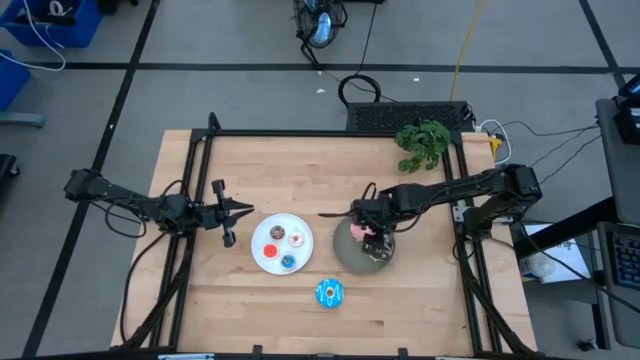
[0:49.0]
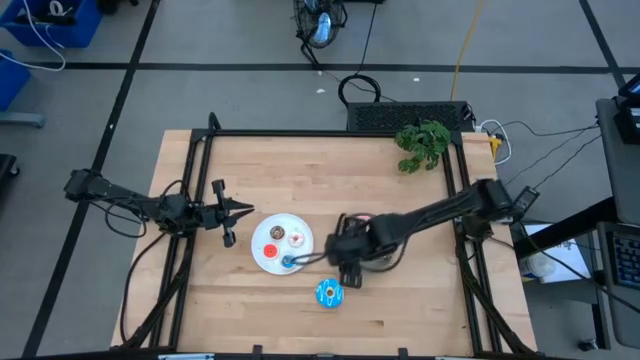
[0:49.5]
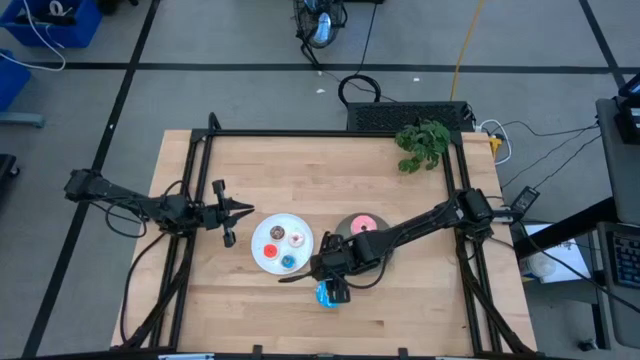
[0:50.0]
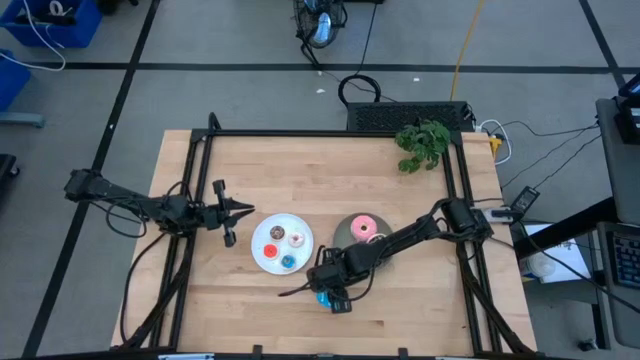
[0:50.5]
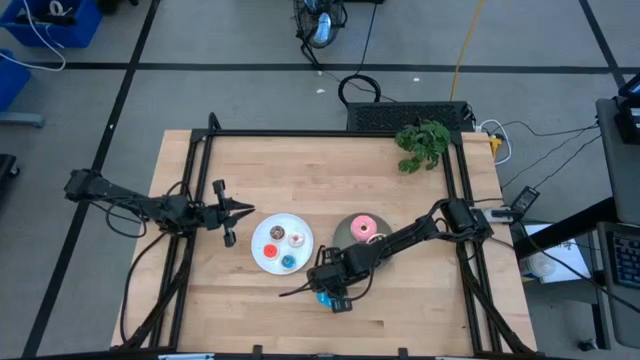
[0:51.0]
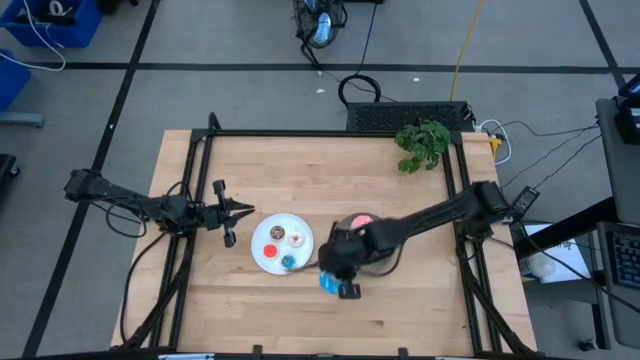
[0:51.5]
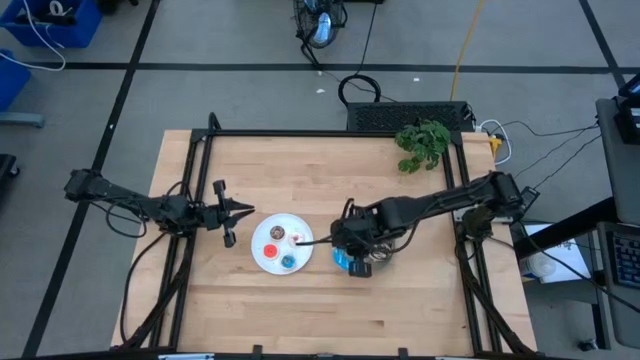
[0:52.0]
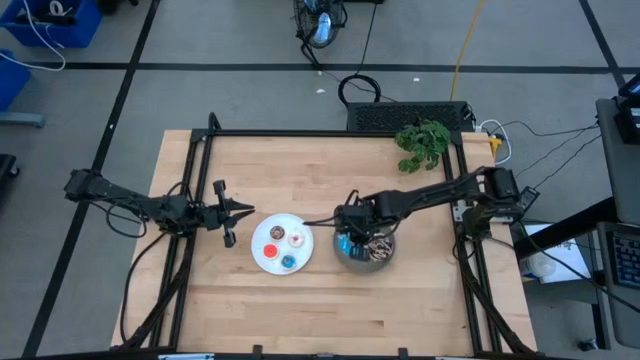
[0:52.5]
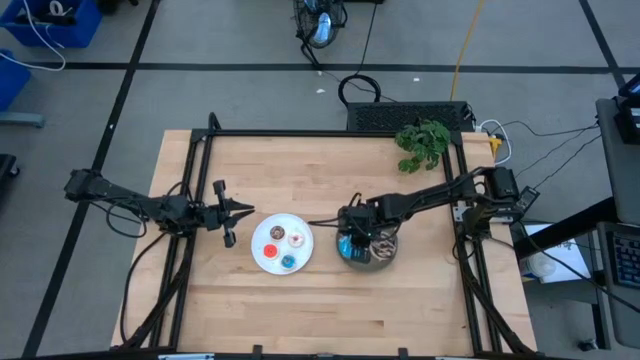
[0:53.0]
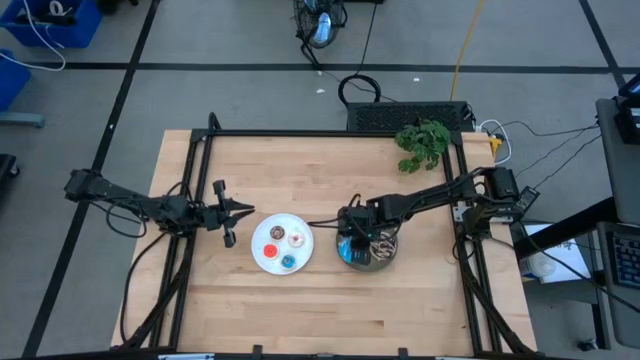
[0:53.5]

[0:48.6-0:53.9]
Task: Pick & Place donuts
Put the big blue donut on the gray plate

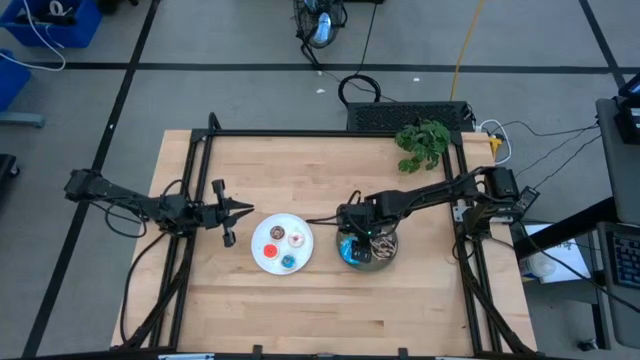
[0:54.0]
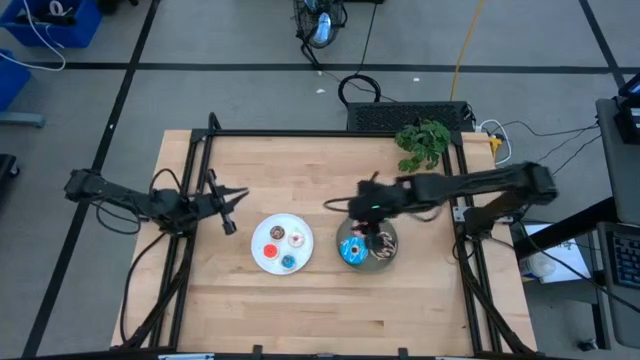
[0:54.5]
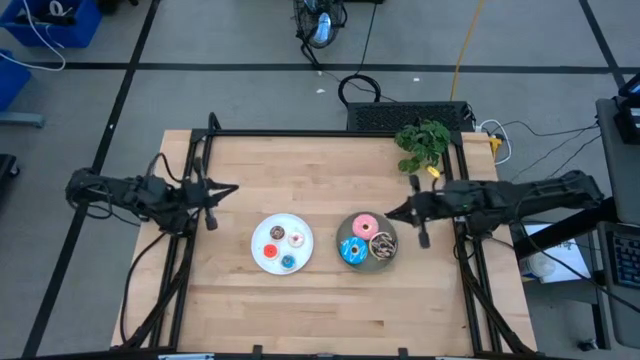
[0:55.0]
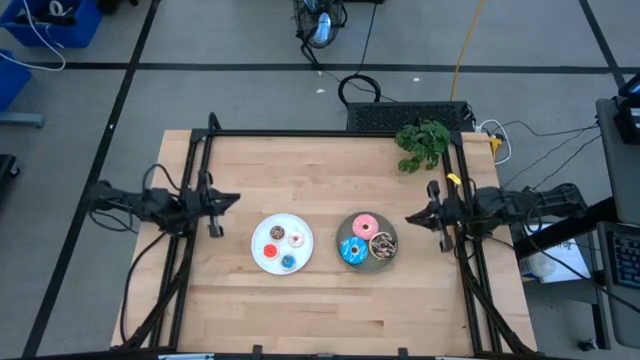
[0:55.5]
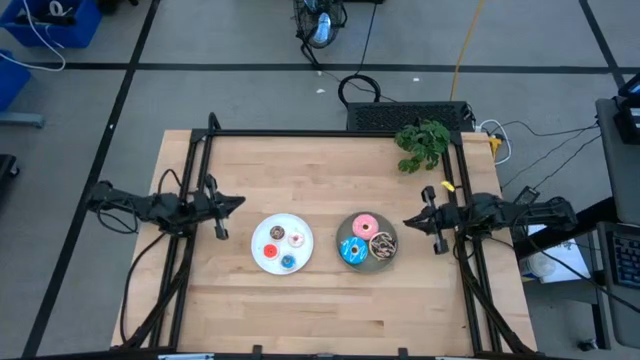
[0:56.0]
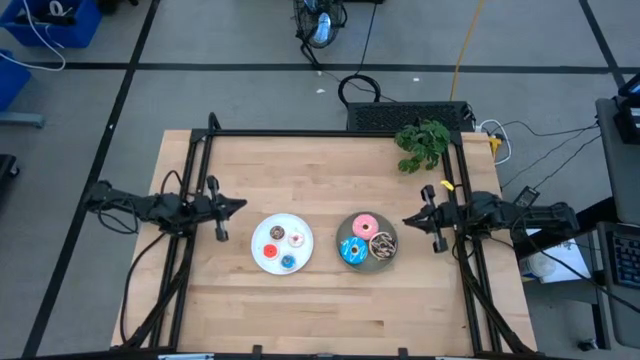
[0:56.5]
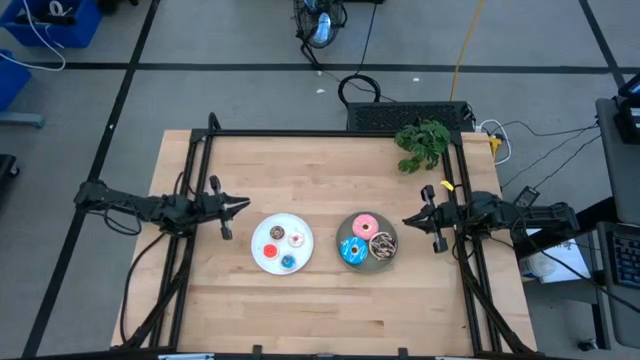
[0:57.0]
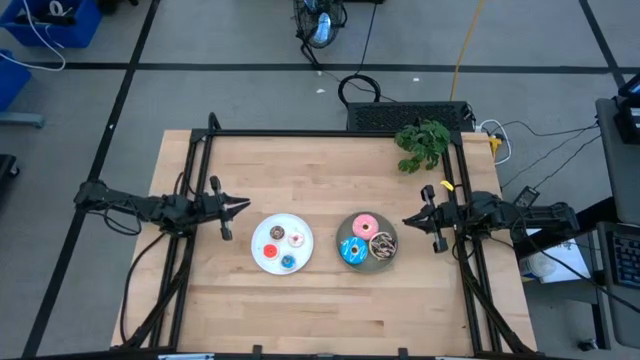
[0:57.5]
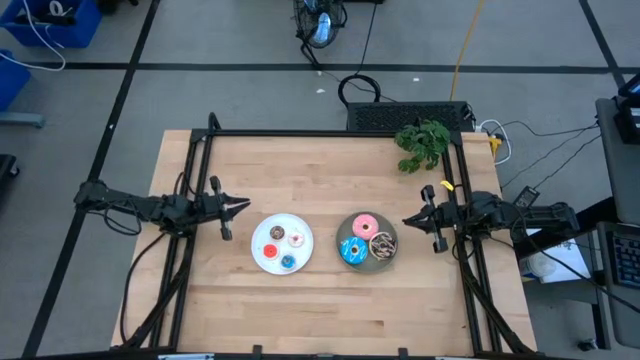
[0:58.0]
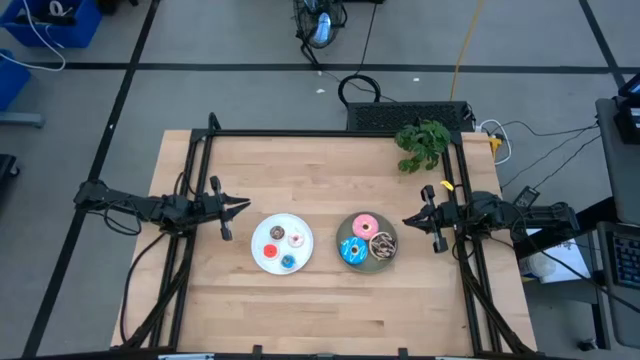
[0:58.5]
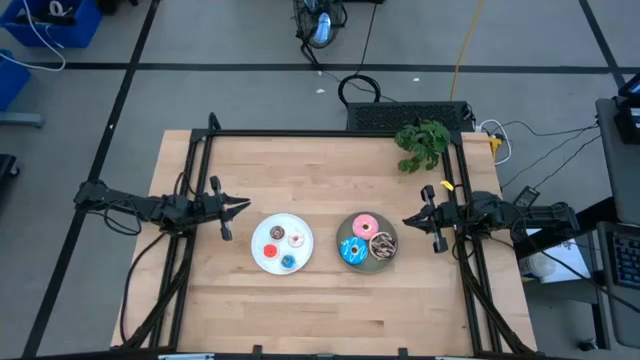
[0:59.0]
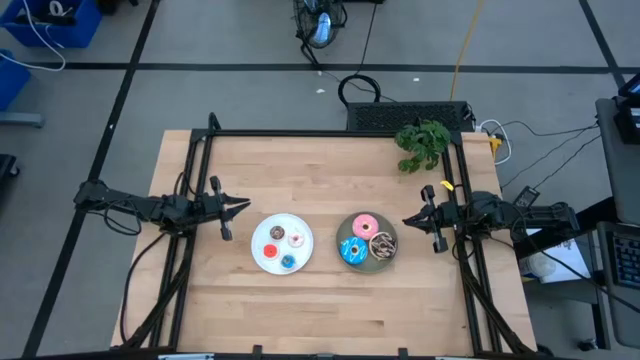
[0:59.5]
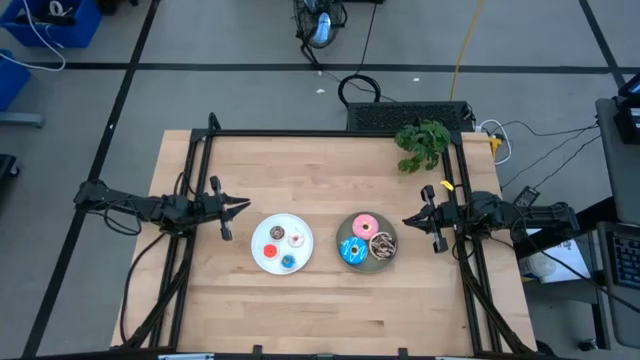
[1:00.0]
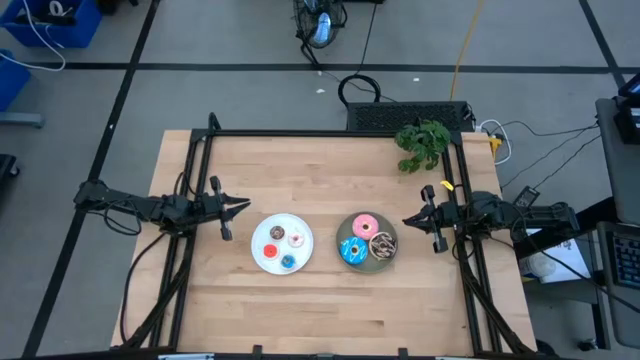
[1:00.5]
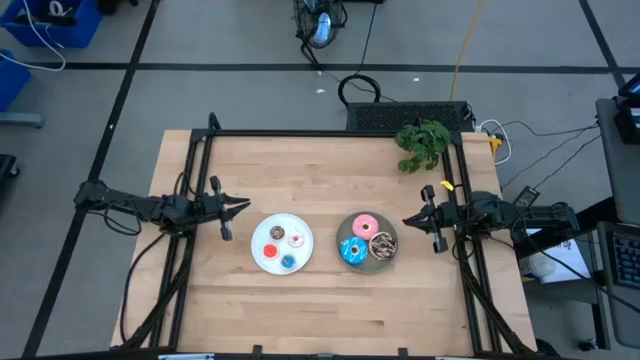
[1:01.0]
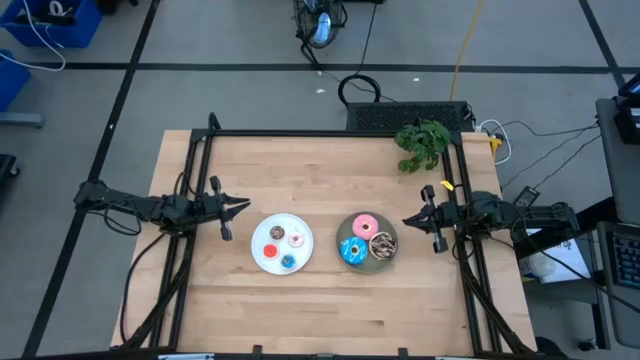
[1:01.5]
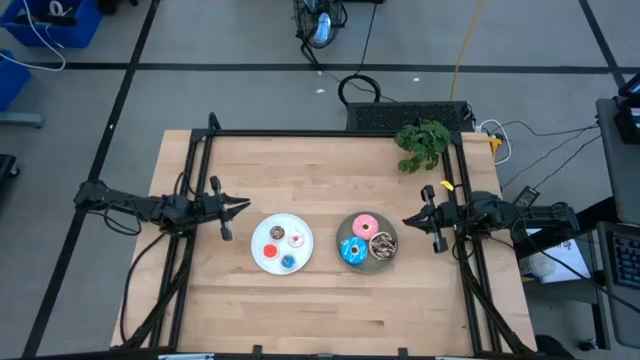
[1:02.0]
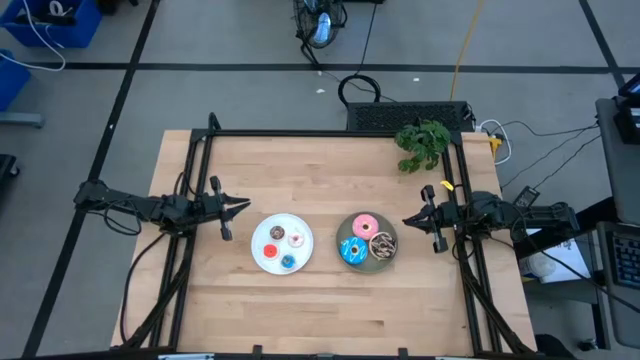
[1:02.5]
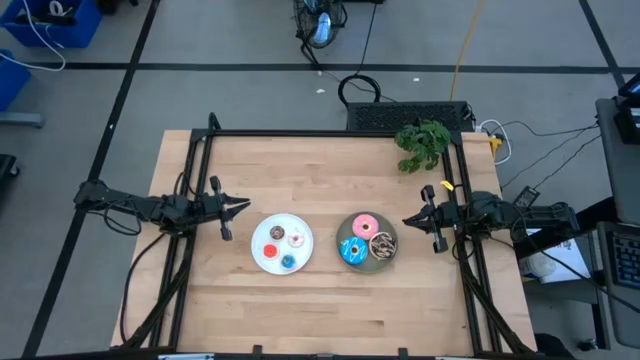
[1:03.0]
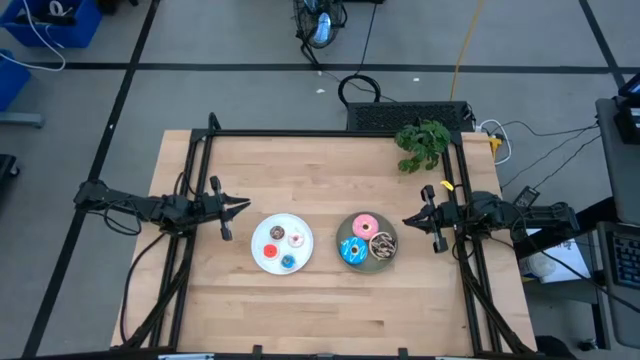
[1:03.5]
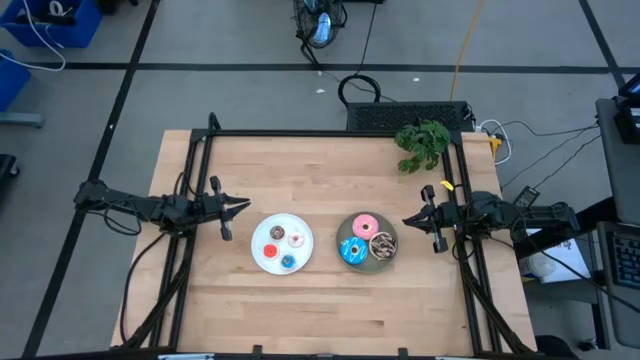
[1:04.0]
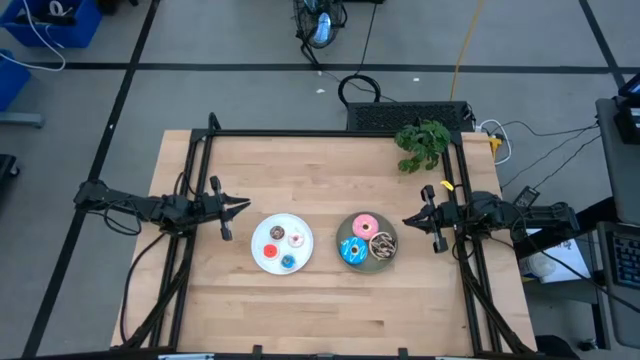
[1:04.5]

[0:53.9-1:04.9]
Return to Home Position

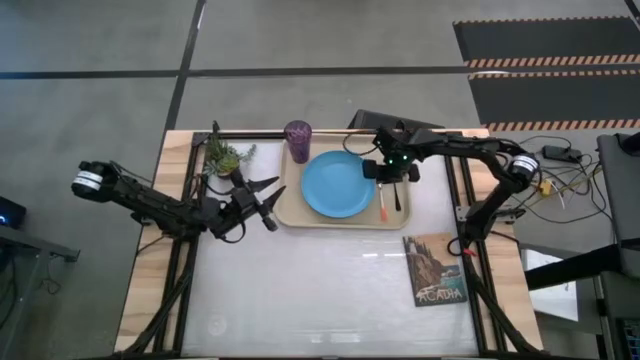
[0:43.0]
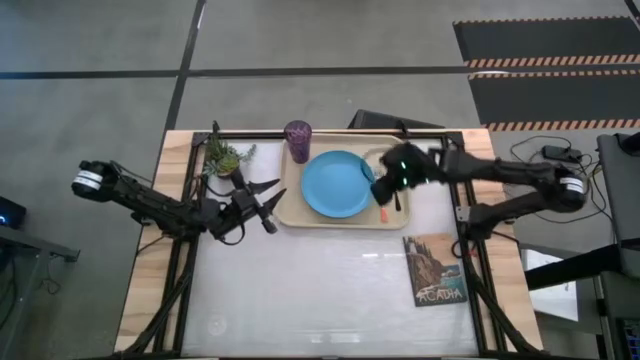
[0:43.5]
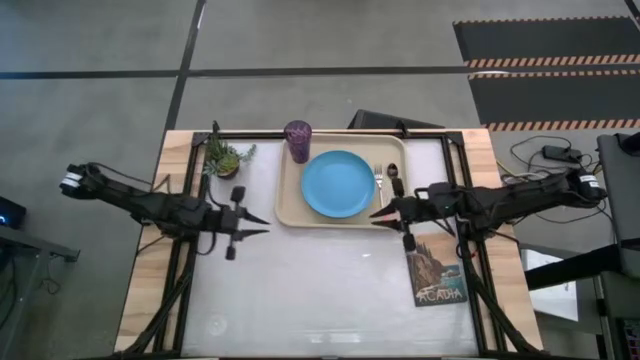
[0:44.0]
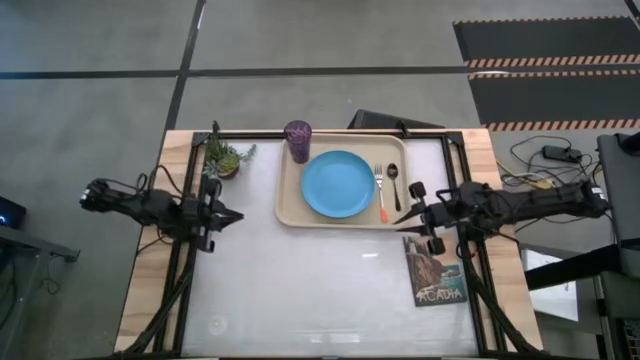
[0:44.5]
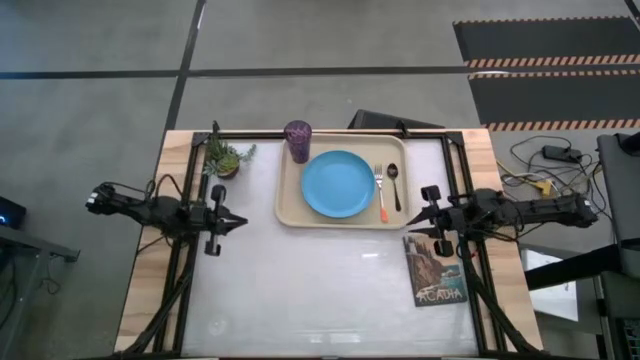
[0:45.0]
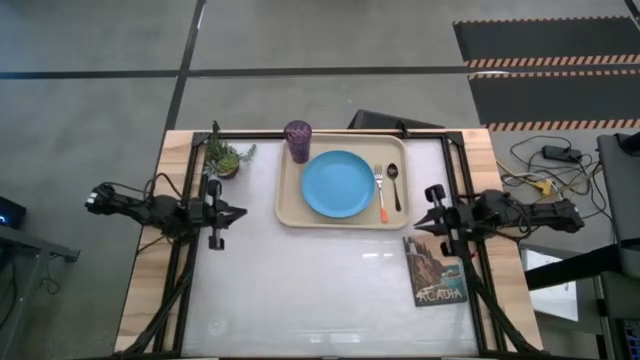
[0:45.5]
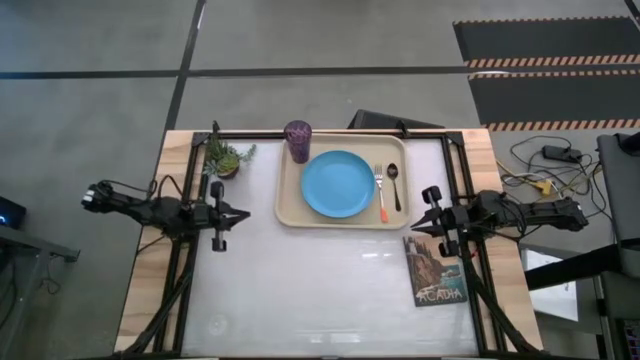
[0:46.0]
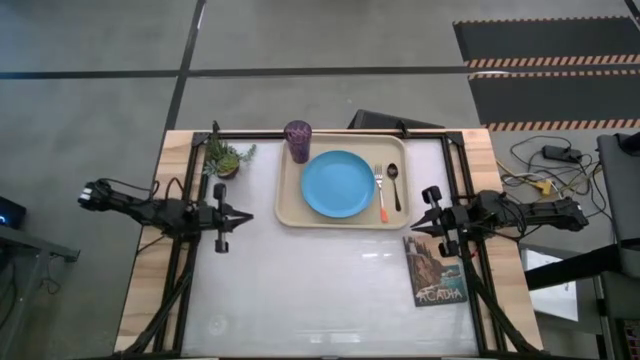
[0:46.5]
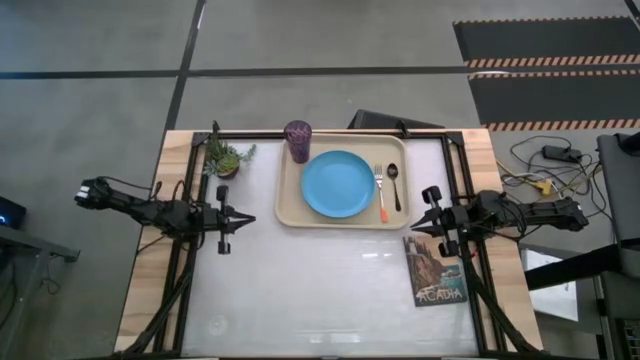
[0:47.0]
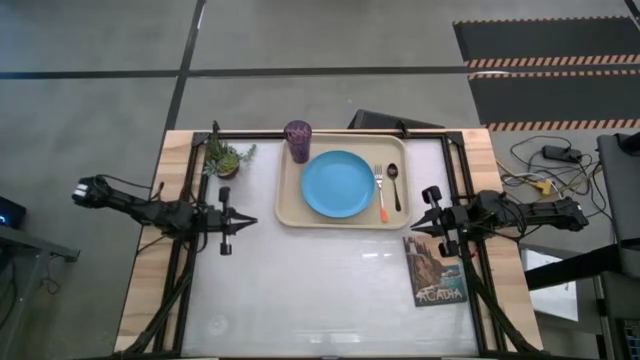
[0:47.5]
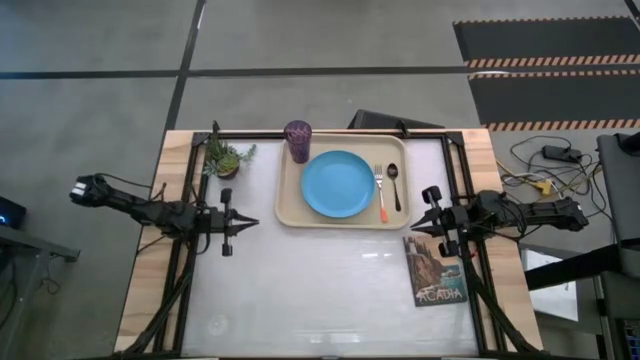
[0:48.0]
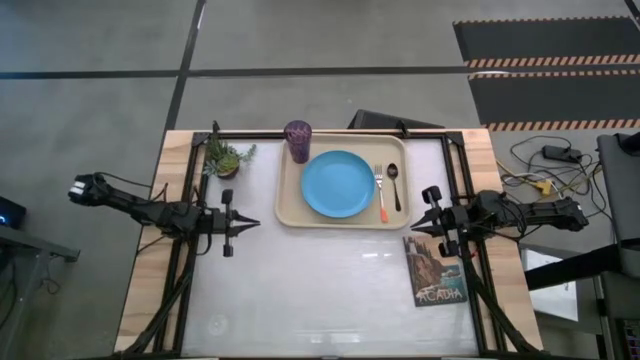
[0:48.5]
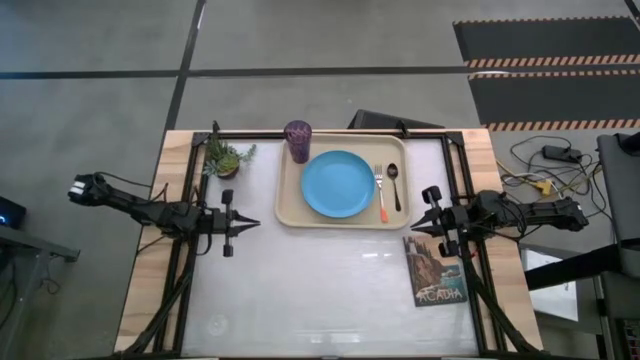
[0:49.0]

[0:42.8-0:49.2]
Task: Pick and place plate/cup/fork/spoon on tray
Return to Home Position
